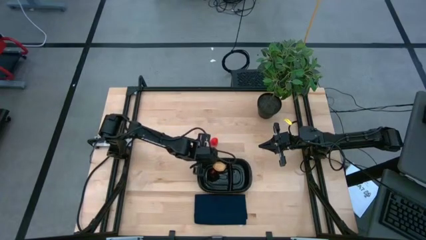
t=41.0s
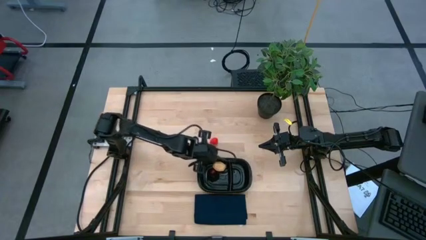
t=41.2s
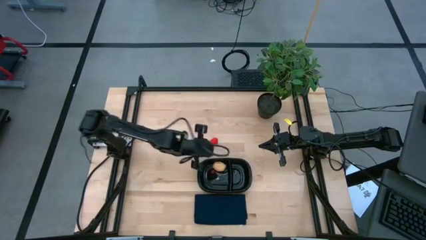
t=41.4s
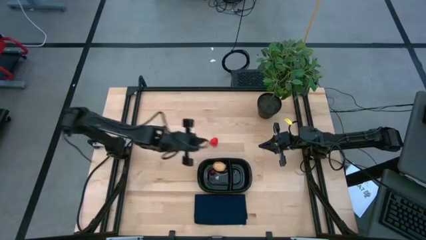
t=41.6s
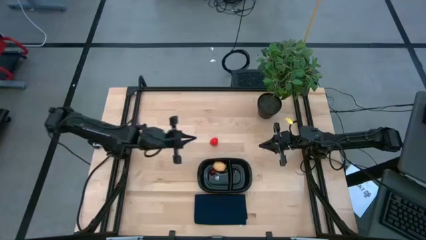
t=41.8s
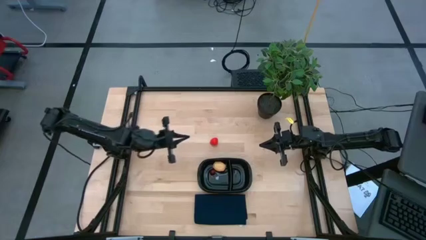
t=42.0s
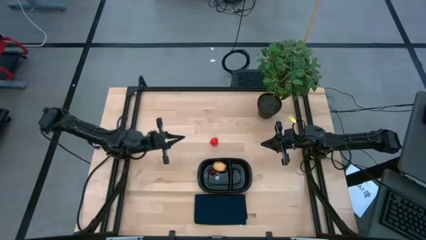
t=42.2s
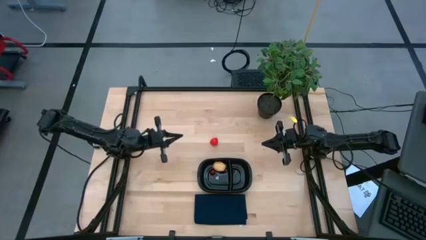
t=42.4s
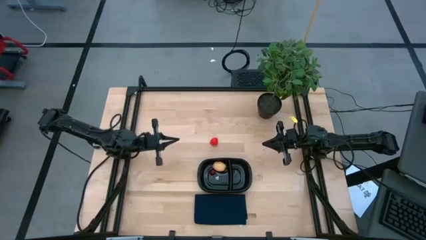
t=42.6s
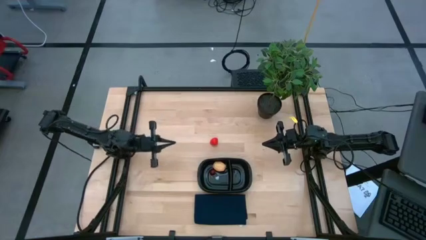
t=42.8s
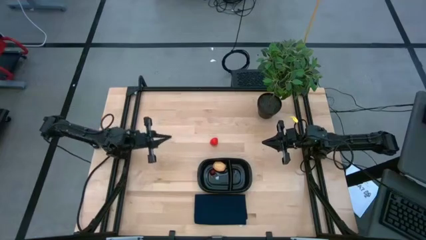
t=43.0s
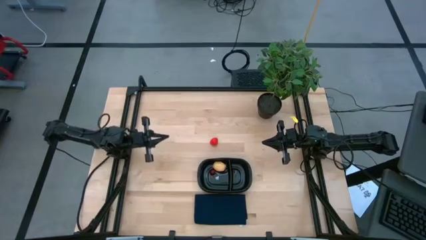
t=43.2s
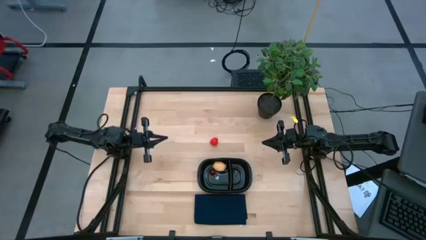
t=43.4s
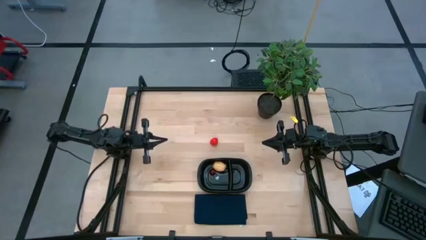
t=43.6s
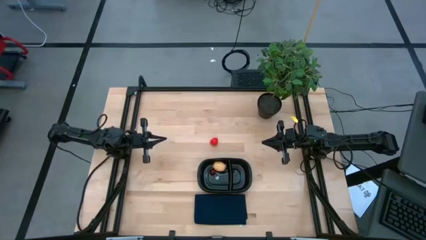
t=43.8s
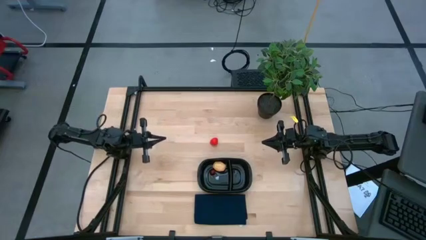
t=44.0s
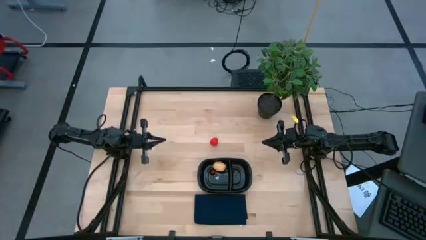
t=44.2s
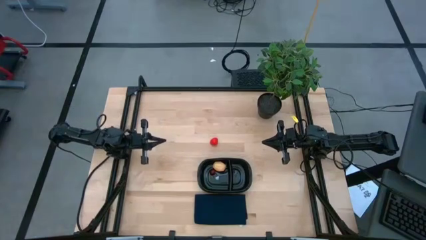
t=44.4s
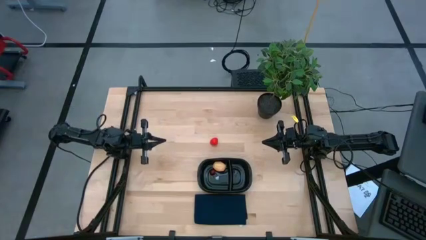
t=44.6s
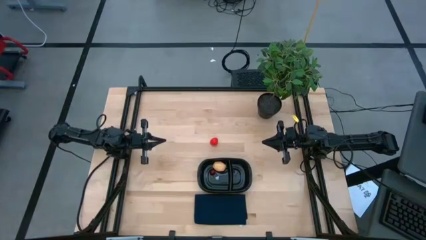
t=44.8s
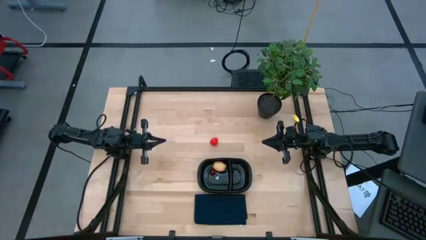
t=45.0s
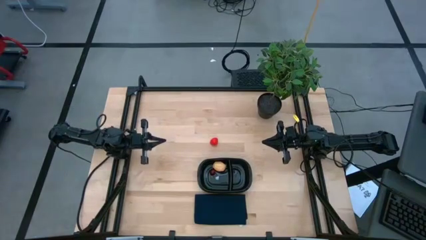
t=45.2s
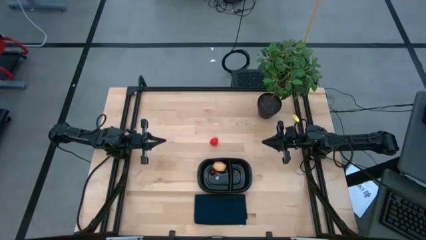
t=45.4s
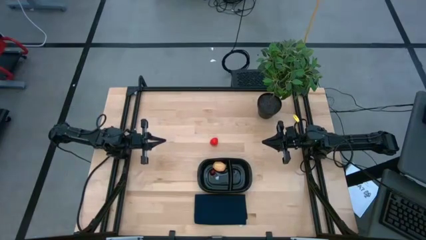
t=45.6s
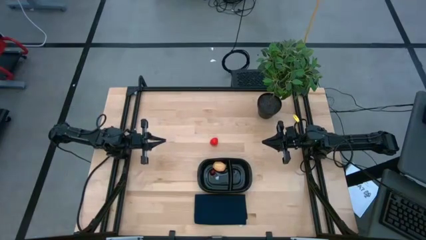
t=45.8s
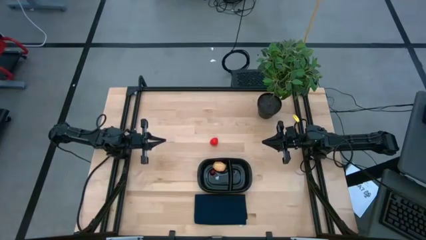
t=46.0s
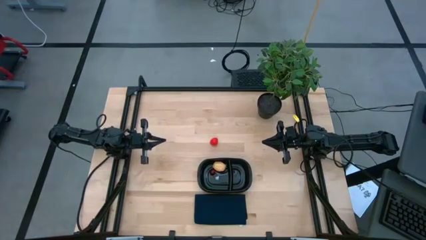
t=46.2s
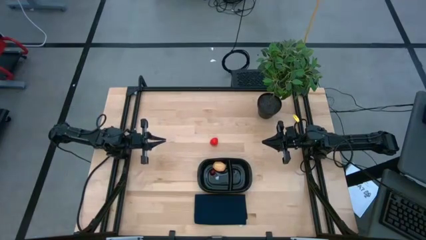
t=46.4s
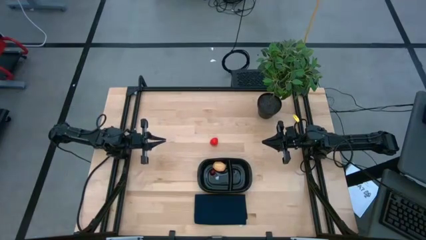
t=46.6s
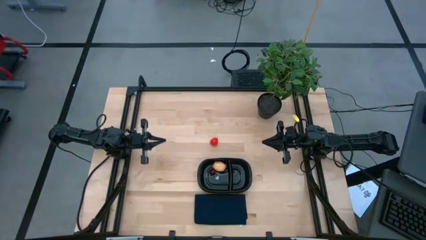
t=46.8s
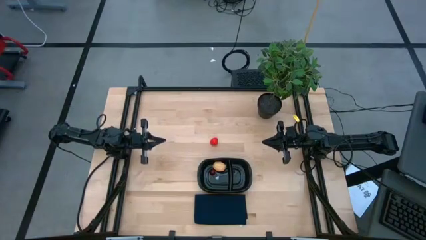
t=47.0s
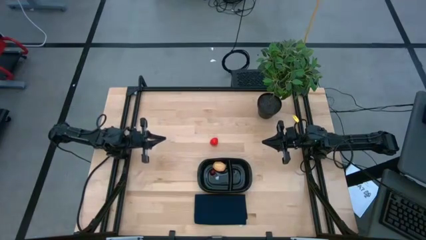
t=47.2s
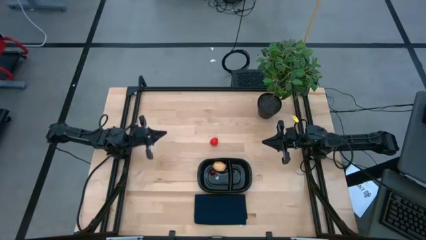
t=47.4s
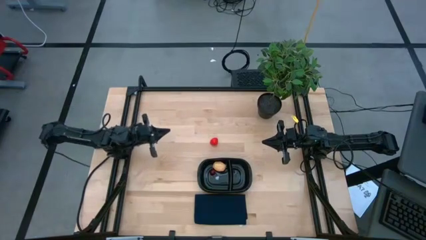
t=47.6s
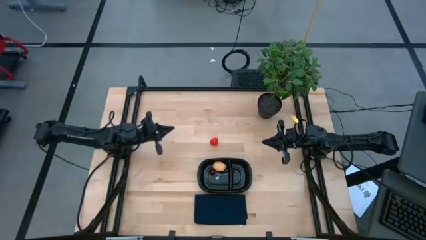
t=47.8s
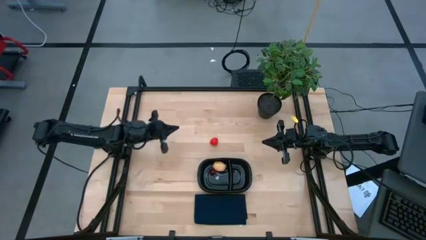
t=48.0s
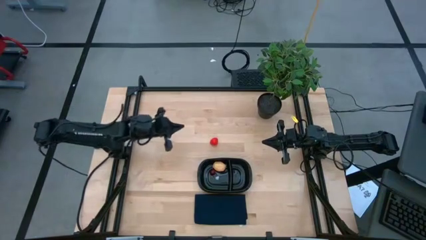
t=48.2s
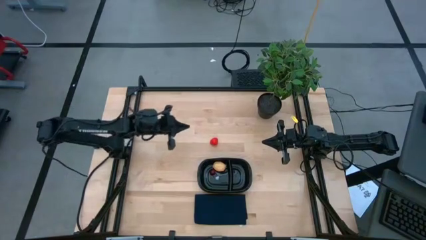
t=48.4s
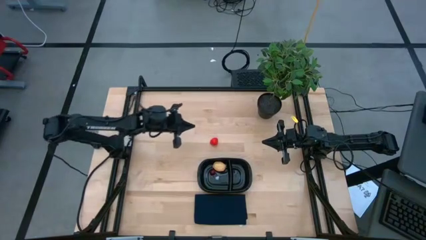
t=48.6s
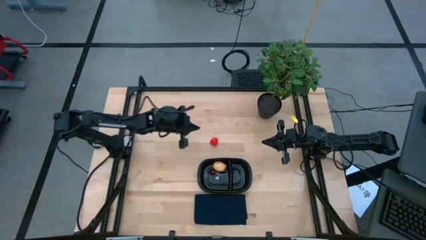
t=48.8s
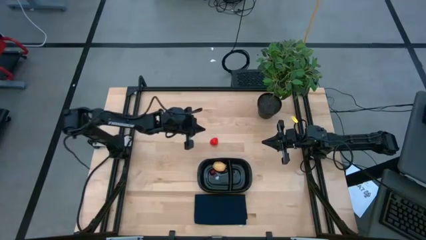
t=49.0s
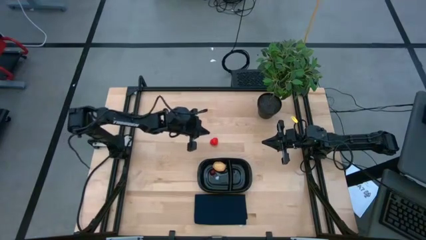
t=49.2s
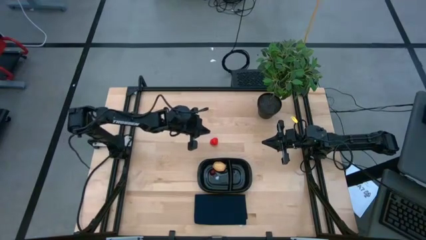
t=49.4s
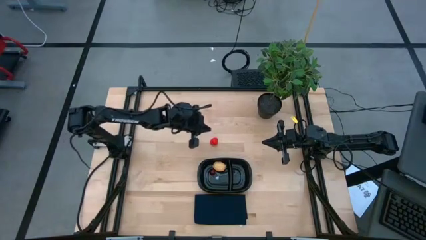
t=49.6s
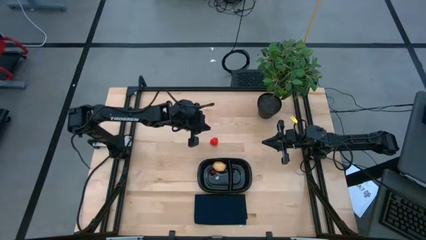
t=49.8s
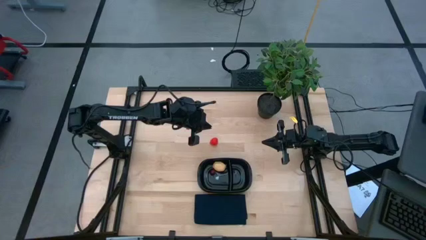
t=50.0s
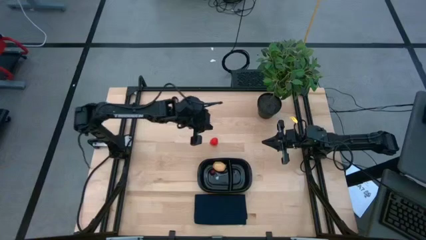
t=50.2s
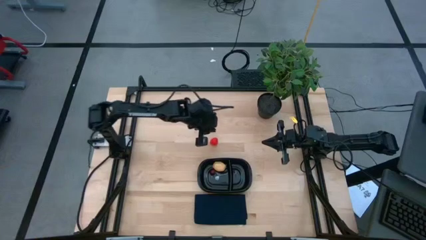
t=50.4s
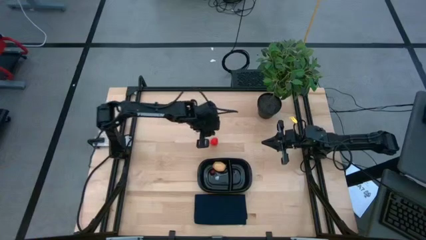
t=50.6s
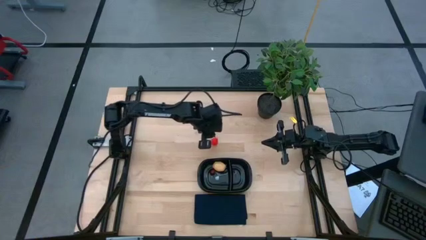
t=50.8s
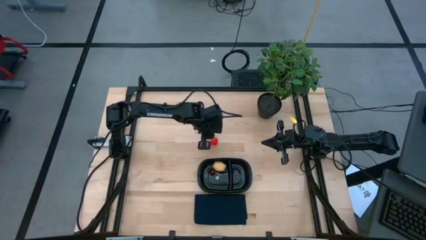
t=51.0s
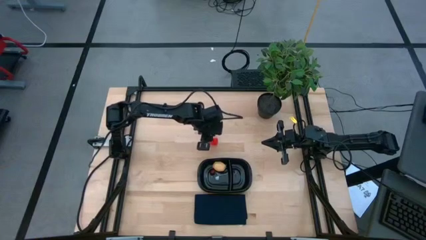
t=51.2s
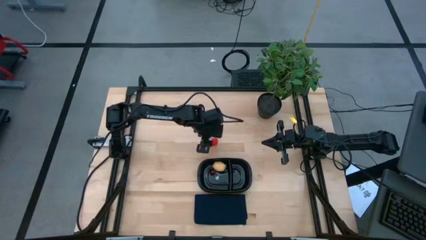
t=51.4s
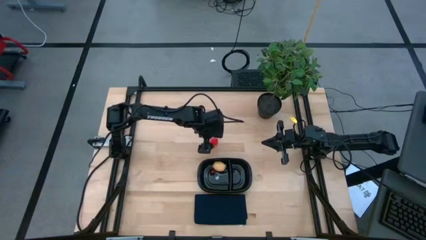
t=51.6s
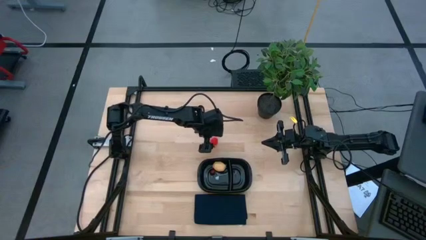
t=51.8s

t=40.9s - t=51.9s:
Task: Pick and placing Produce into tupperware
Put the strawberry into the black container

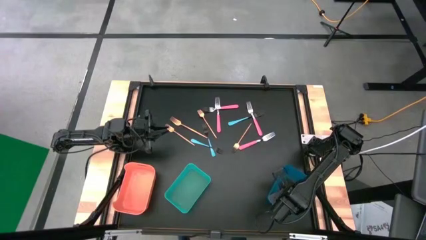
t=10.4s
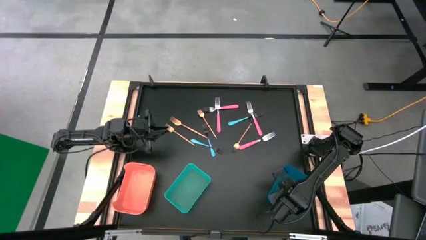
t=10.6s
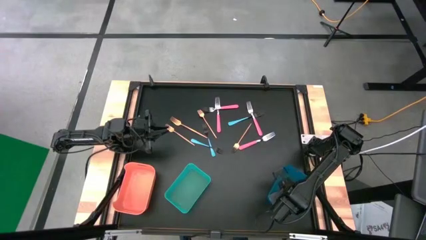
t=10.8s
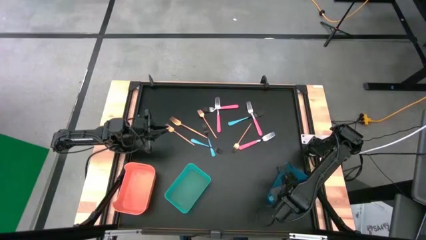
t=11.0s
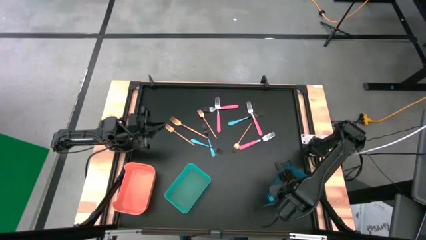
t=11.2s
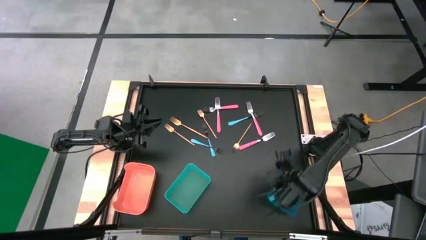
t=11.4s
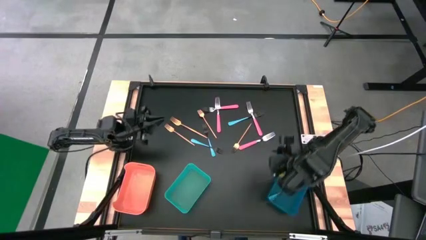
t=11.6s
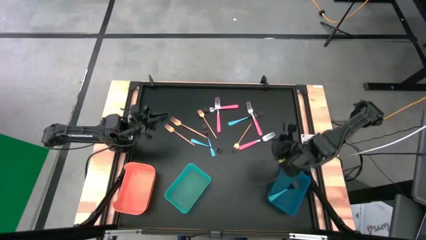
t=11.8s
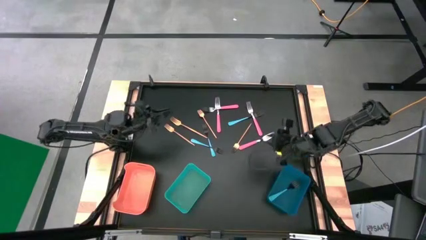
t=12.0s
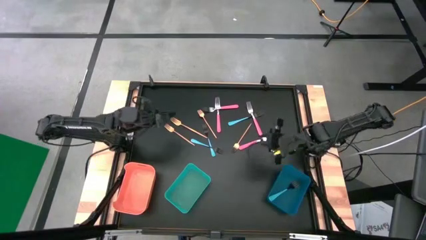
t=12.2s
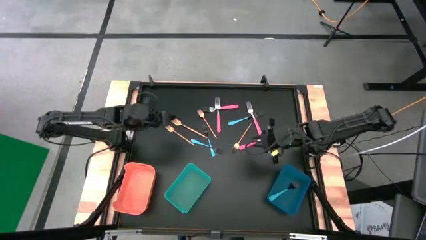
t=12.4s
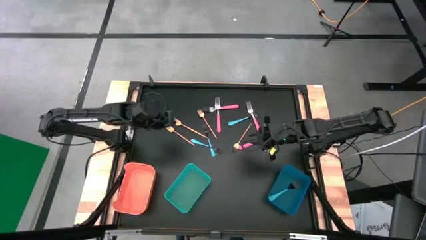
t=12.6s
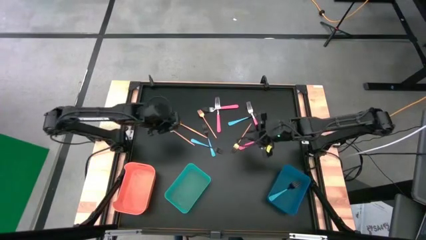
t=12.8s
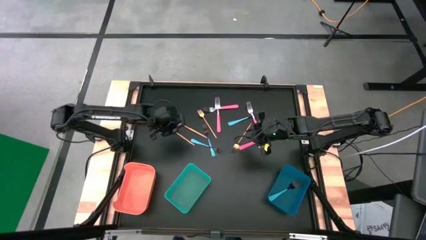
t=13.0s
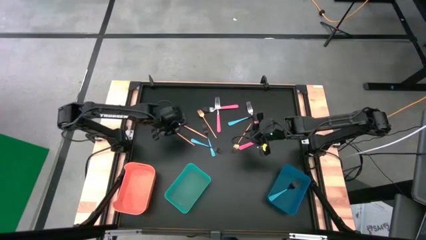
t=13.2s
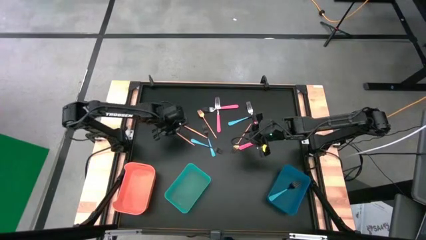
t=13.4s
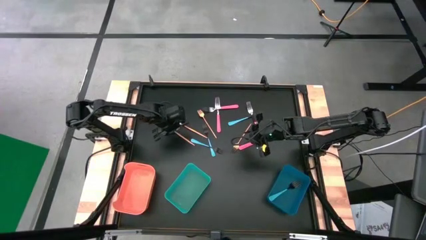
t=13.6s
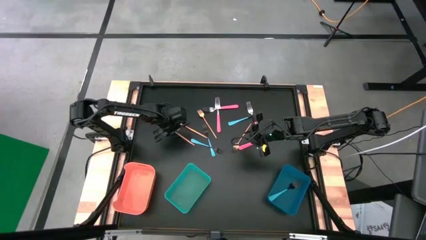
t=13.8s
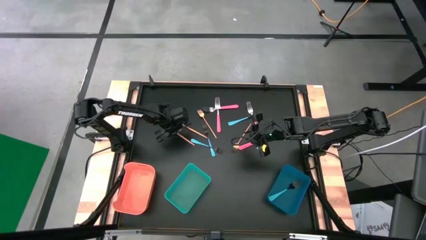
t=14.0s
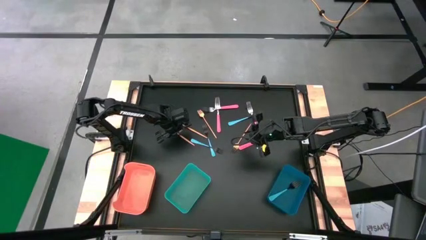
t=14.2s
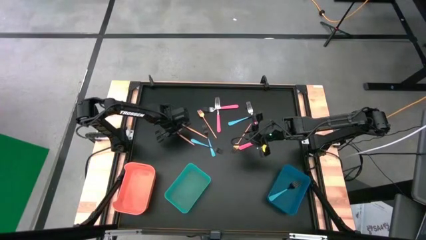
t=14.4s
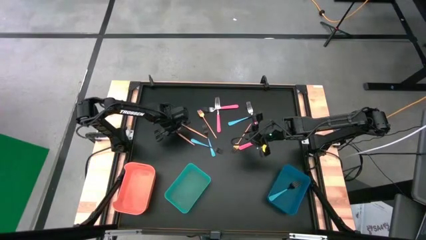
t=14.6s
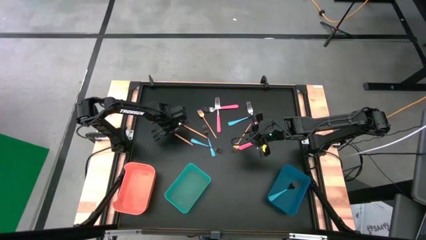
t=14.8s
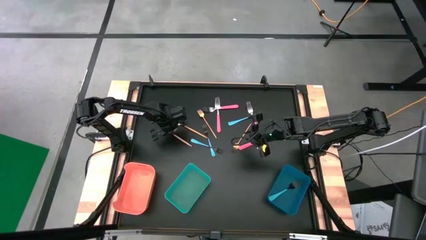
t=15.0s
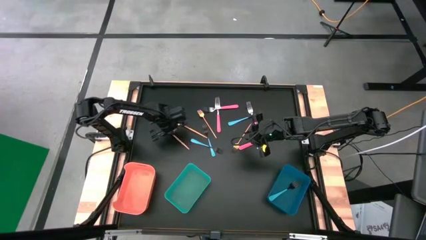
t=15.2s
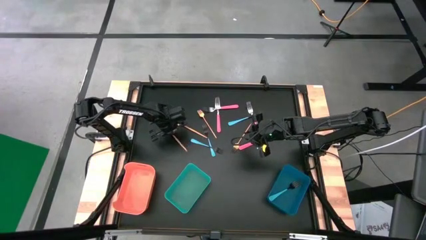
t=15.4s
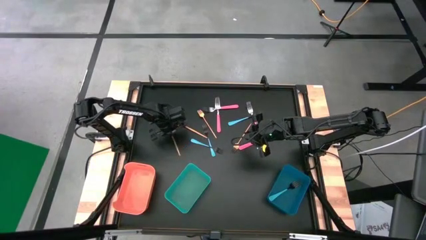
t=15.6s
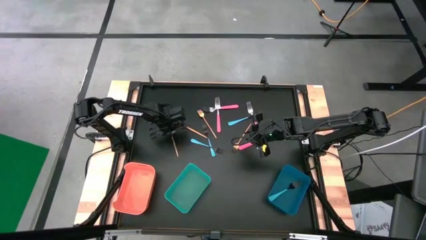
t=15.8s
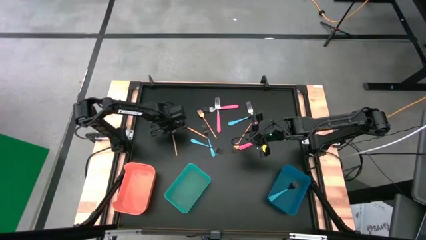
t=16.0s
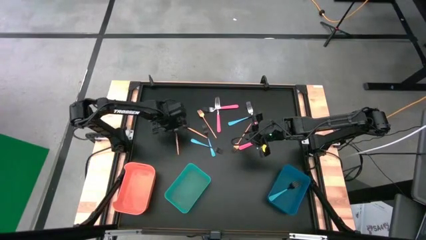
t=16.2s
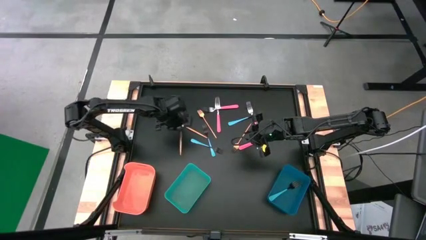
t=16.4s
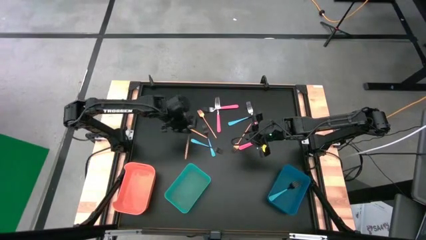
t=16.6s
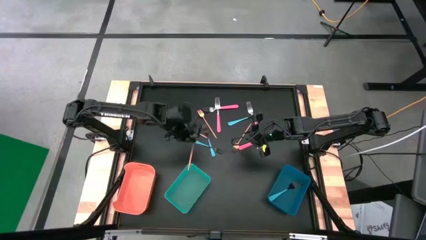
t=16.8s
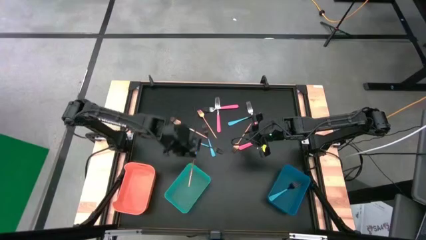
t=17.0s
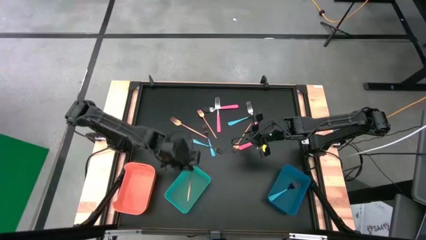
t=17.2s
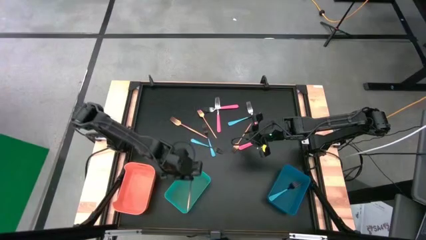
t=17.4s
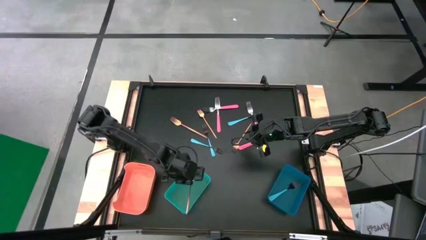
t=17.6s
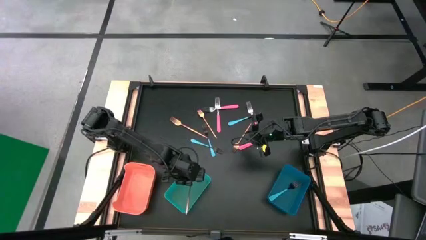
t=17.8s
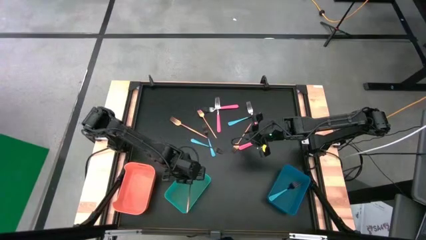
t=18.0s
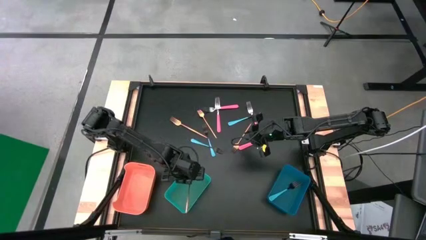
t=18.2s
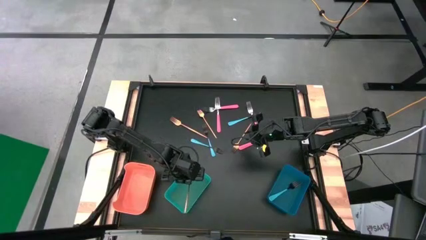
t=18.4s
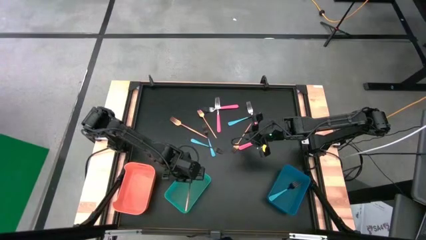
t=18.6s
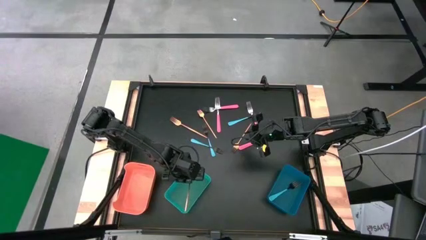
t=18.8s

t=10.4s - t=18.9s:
Task: Sort silverware by color (type)
Put the gold fork into the green bin
